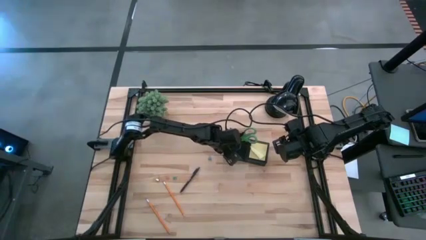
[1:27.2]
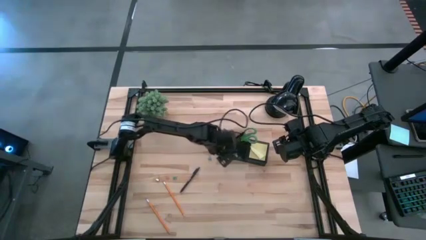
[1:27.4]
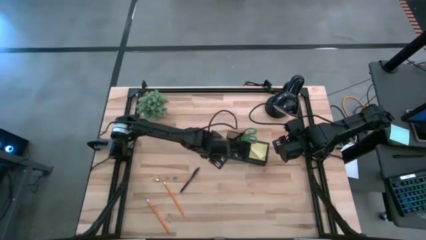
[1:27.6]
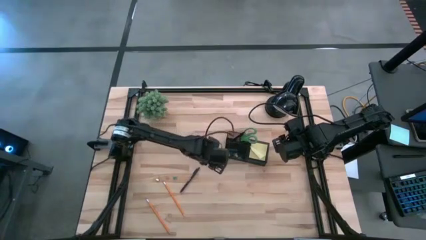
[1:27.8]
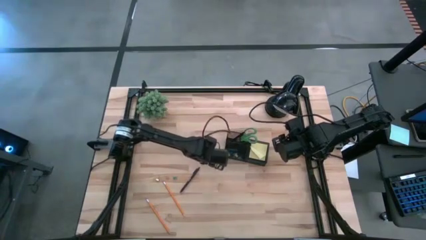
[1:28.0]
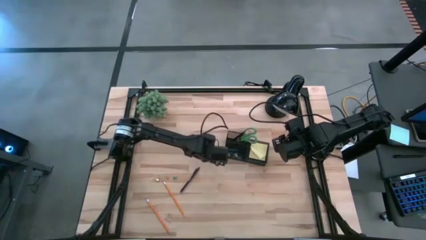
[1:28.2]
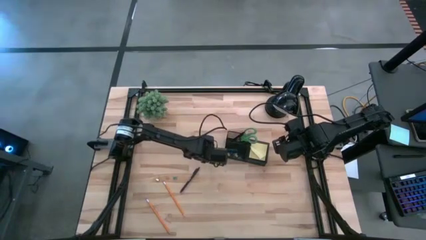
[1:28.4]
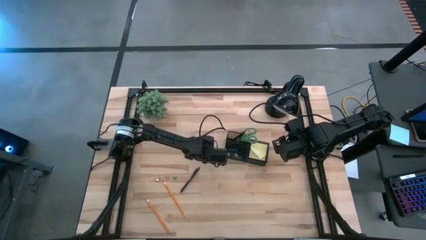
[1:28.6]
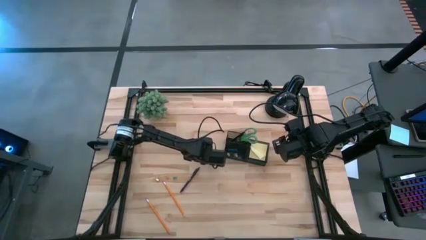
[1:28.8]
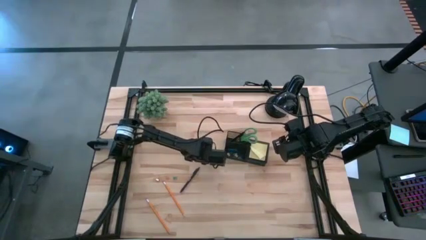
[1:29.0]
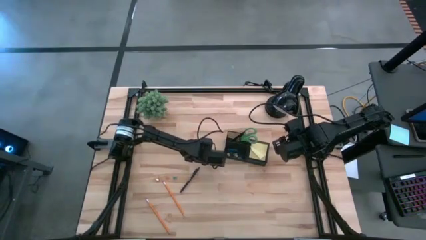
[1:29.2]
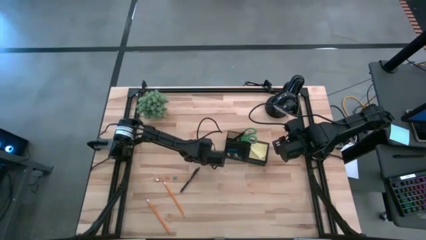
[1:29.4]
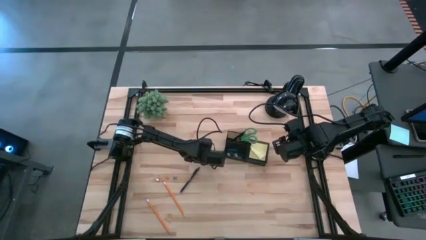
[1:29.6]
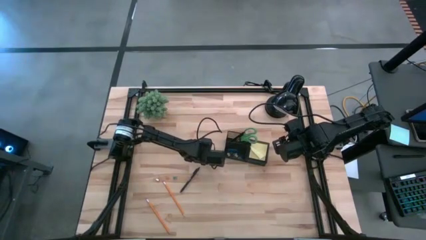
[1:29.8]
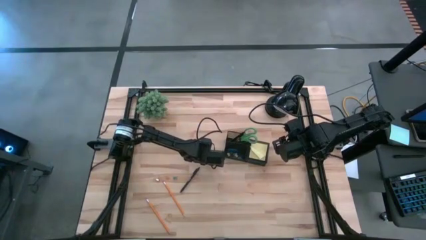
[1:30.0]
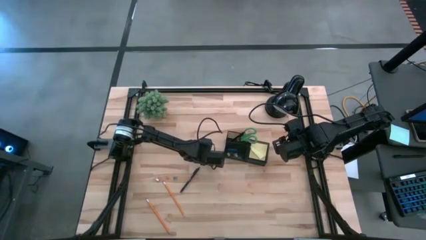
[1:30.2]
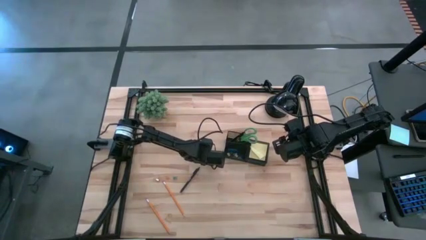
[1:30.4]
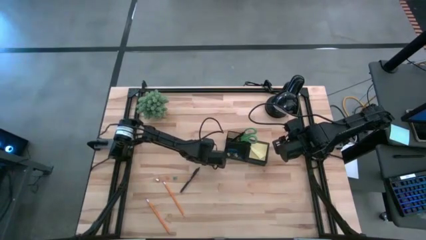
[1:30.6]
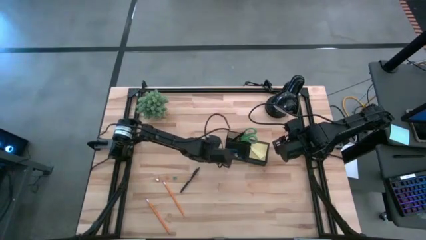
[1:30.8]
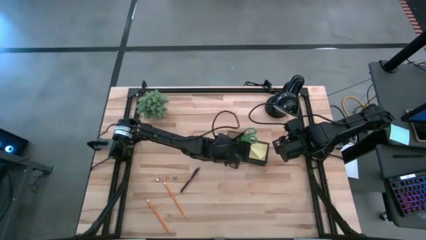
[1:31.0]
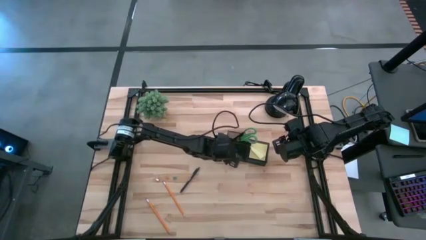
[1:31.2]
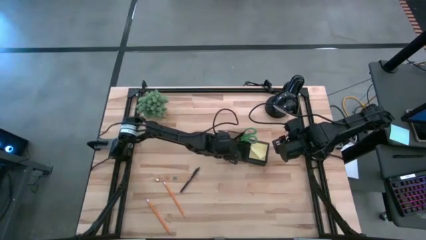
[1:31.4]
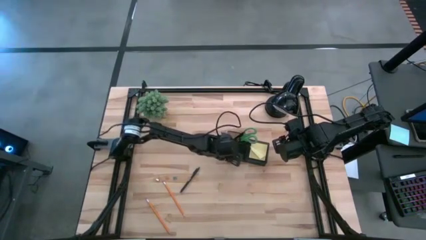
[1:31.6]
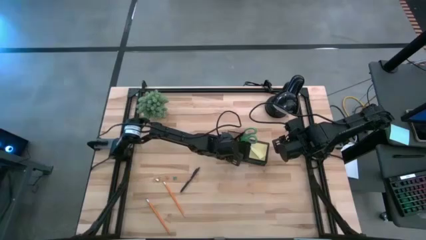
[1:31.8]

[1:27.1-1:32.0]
Task: Pick and place office supplies into organizer
Put the right blue binder clip into the black mesh organizer

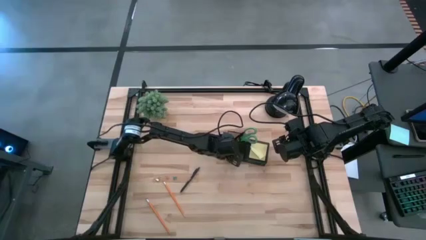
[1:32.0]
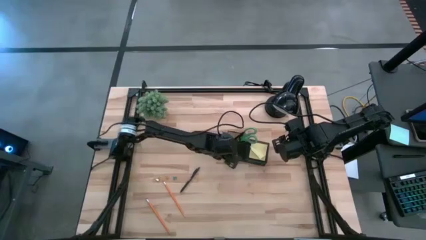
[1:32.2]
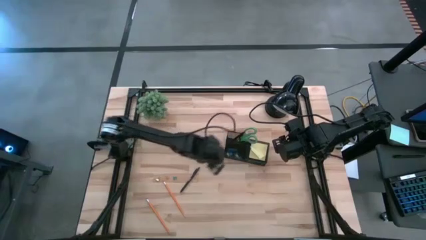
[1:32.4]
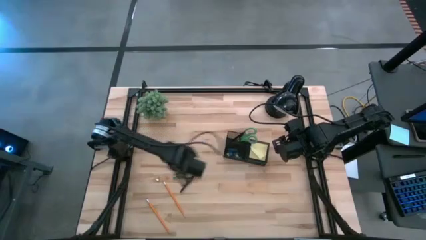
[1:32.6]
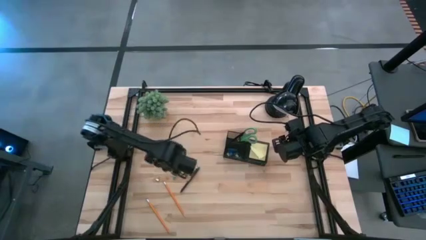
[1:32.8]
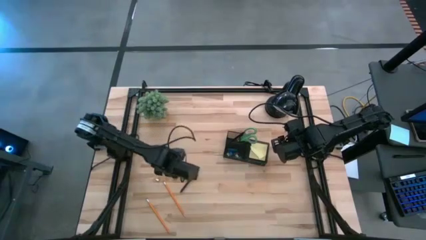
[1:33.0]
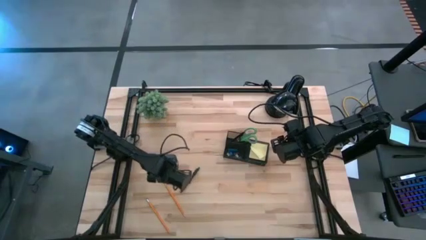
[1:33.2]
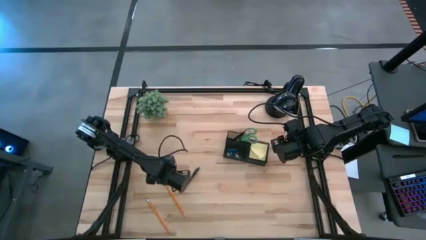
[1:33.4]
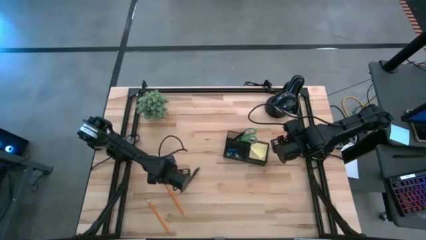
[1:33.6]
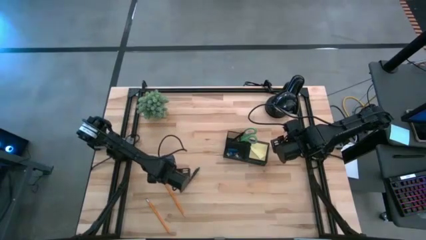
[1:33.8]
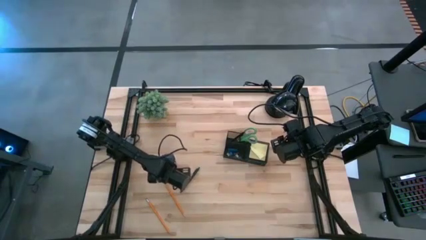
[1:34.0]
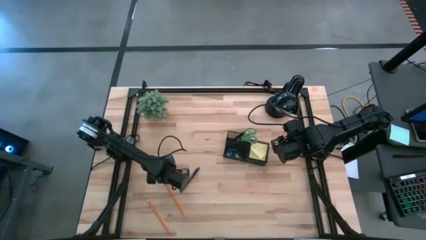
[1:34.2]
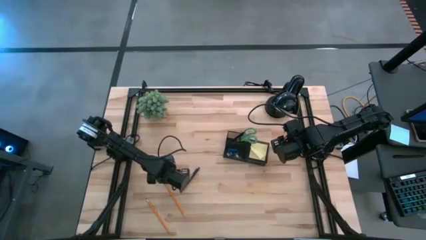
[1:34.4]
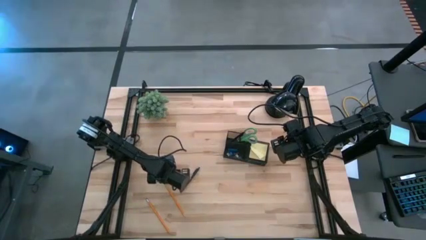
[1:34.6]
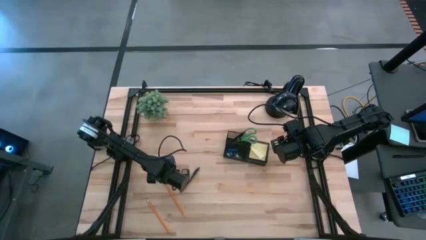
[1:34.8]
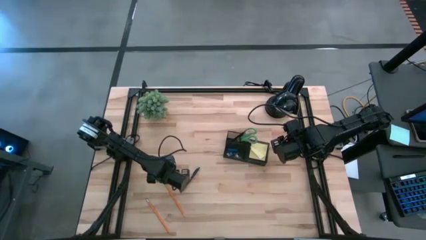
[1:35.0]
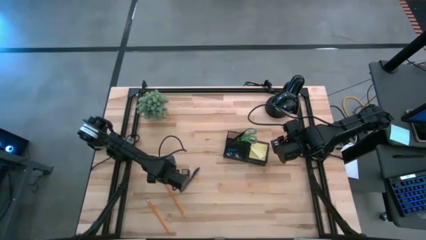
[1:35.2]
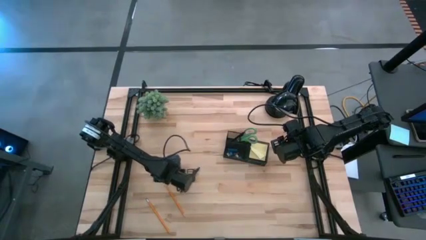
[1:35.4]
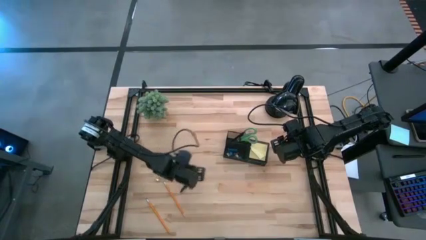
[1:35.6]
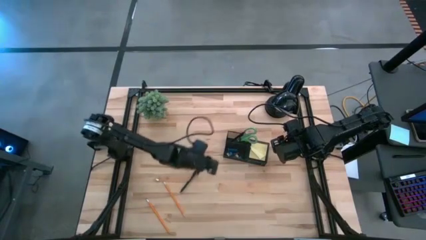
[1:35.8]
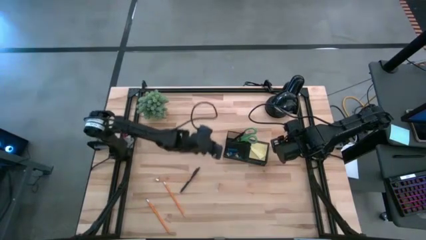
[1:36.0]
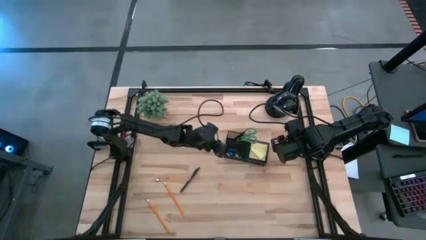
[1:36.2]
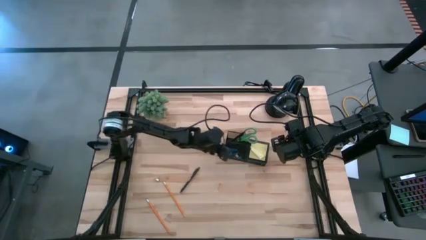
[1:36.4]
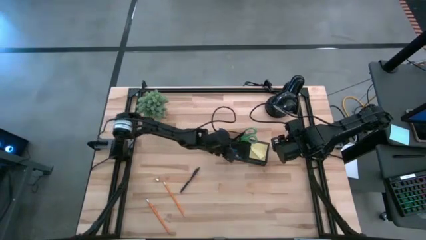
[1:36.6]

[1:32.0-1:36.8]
Put the blue binder clip into the black mesh organizer

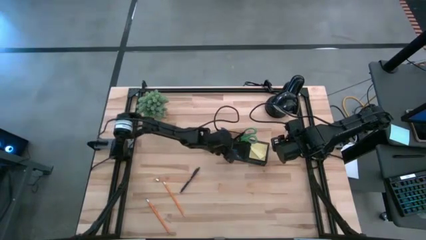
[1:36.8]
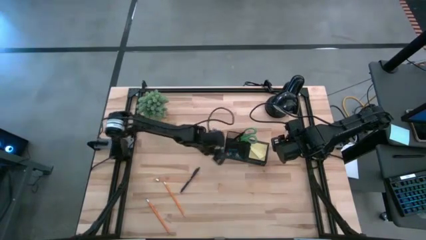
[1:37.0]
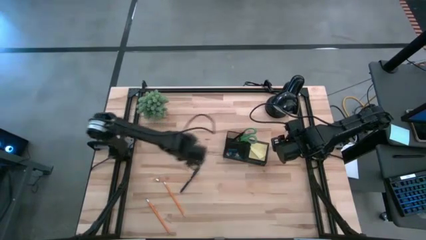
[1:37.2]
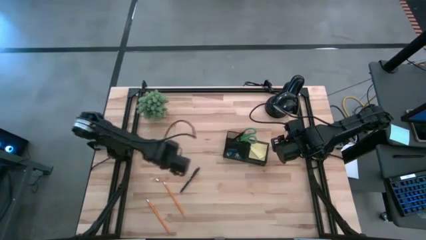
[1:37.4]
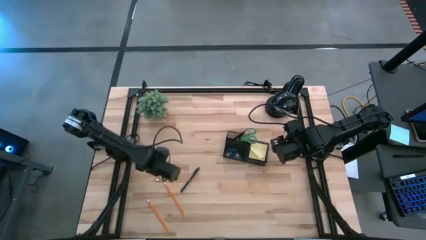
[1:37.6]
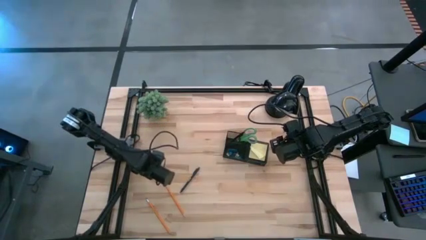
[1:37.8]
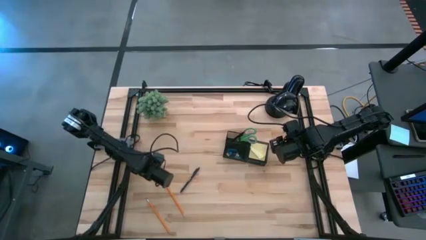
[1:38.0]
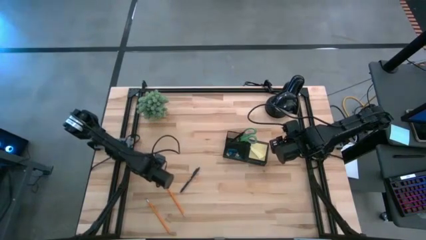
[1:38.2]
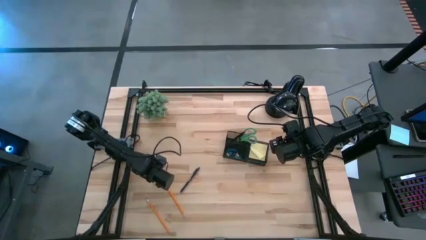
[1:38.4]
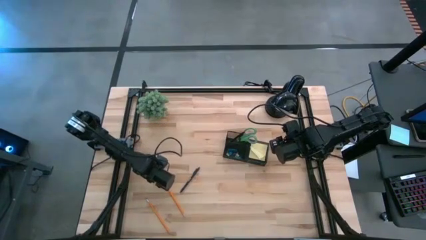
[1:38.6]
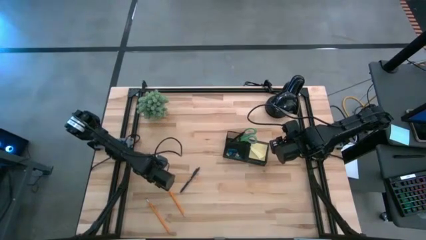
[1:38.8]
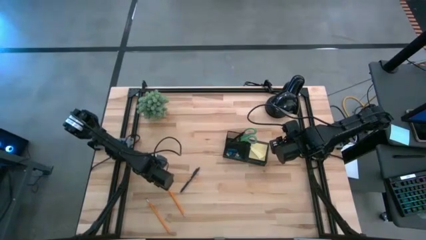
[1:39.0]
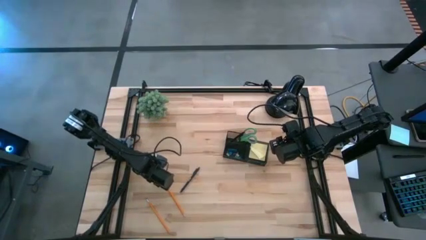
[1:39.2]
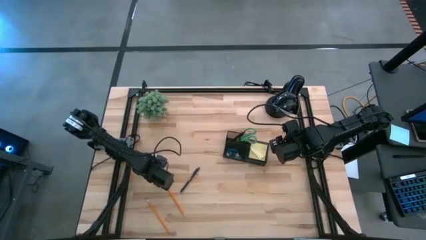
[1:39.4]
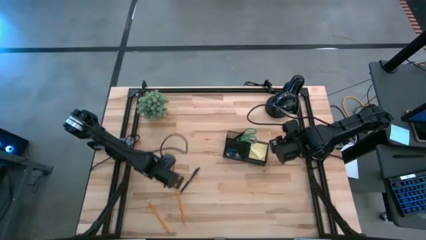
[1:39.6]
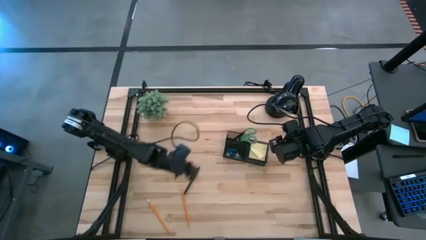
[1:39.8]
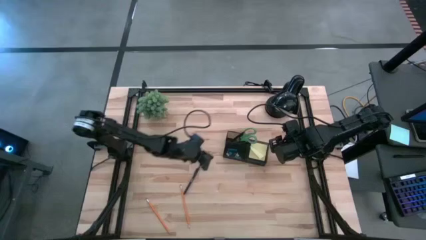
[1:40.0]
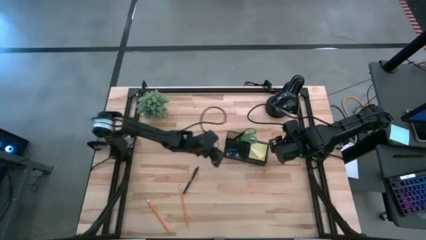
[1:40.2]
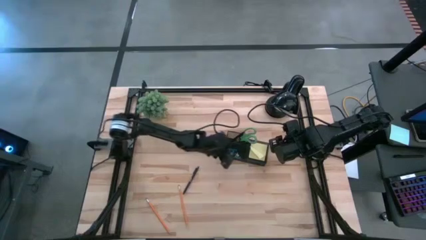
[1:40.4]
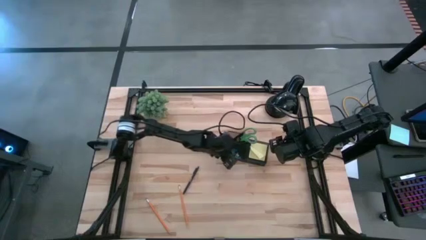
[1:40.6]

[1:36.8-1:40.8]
Put the yellow binder clip into the black mesh organizer

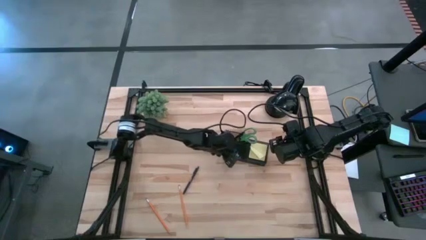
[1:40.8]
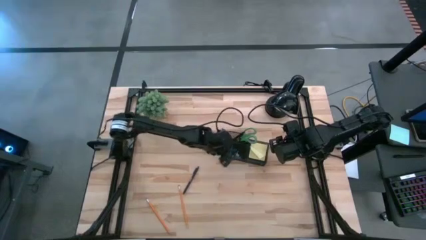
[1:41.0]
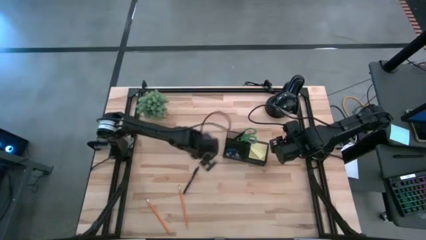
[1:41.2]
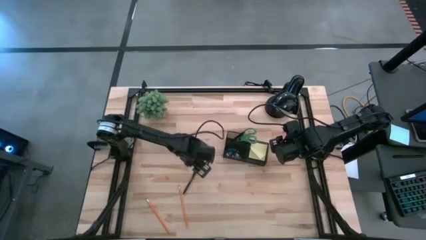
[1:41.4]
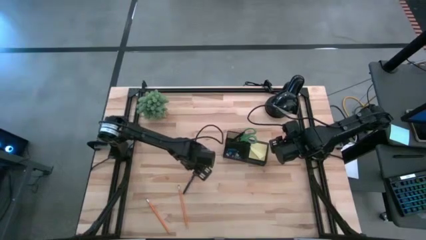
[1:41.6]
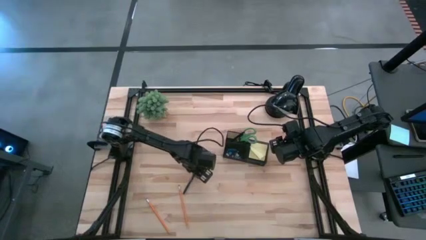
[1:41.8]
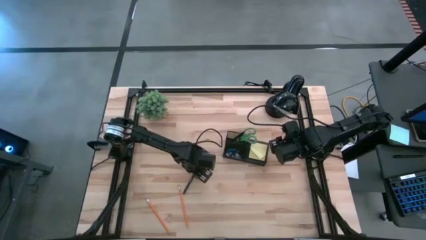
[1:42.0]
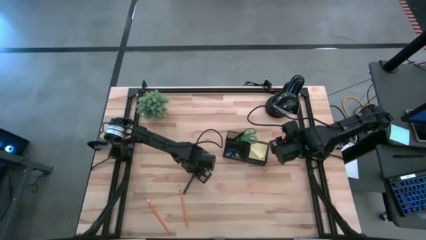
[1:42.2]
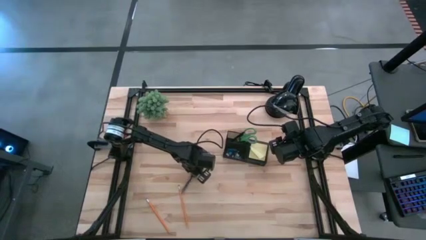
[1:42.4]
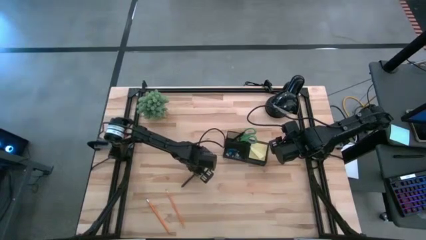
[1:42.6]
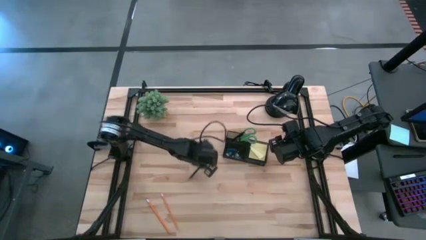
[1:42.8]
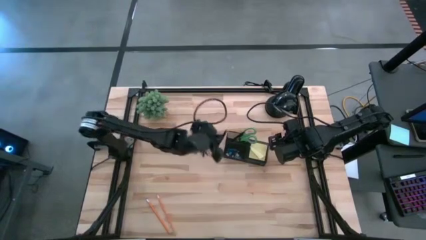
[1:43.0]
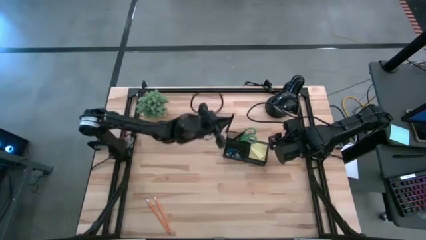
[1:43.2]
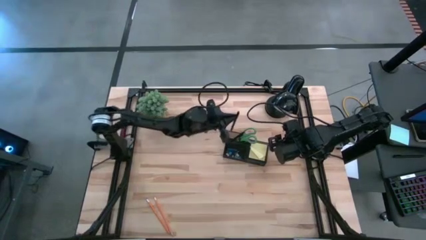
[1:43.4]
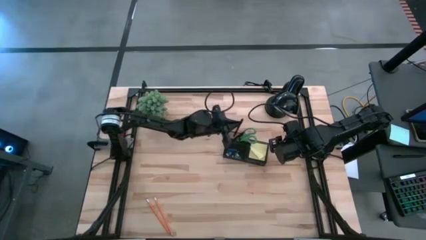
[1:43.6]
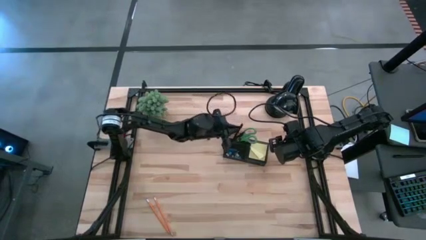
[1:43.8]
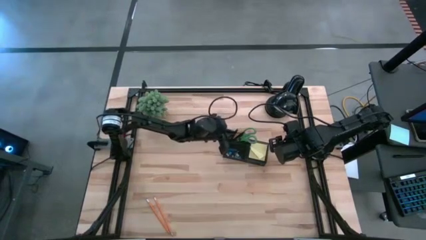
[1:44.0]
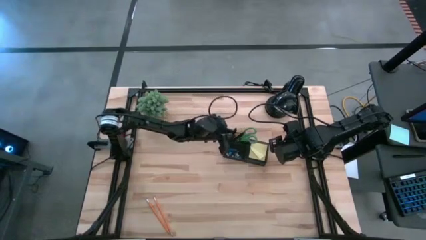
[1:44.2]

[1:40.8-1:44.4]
Put the black ballpen into the black mesh organizer
